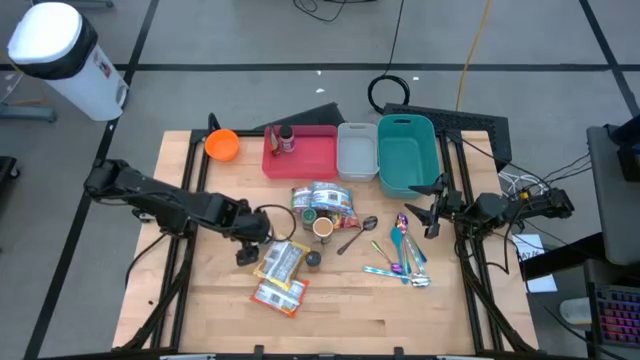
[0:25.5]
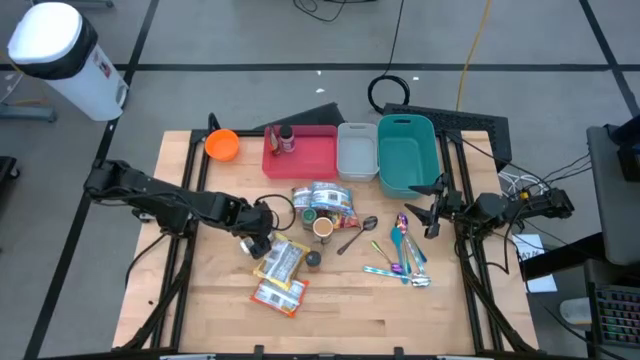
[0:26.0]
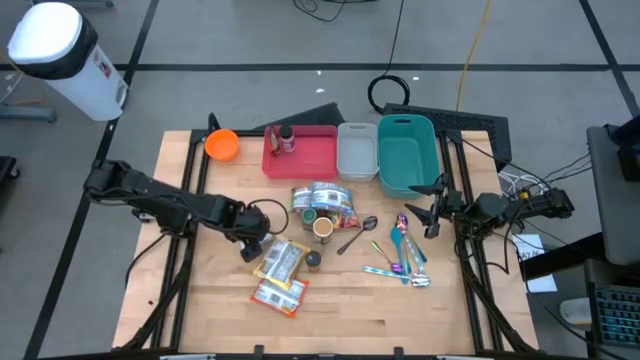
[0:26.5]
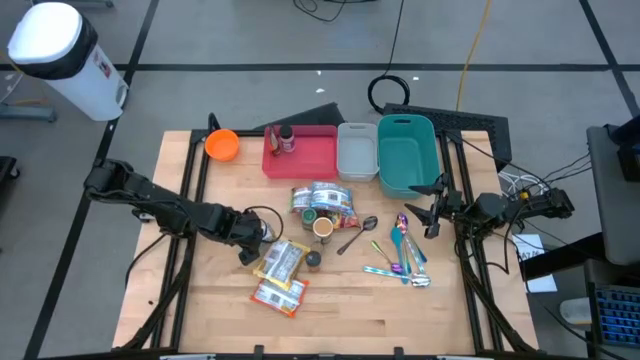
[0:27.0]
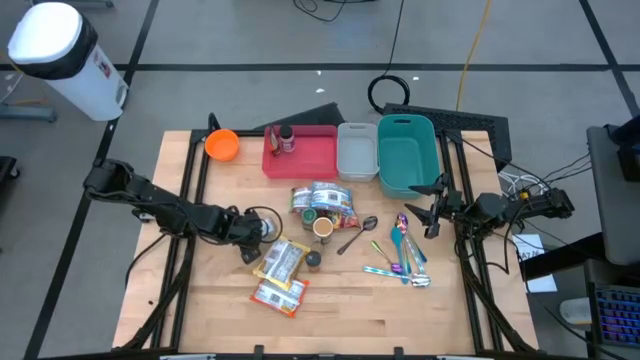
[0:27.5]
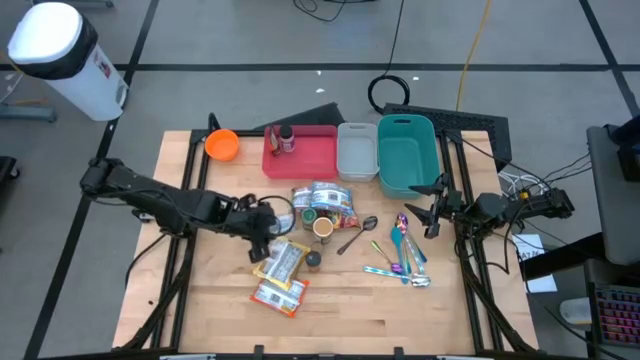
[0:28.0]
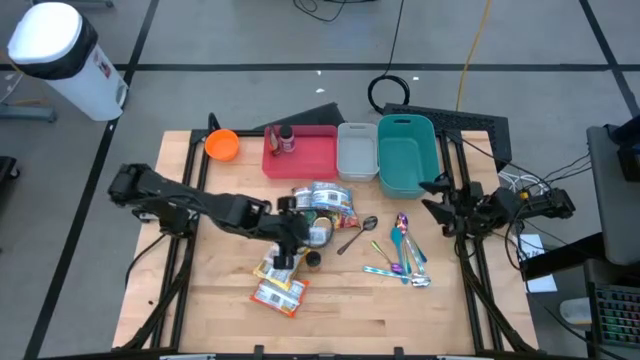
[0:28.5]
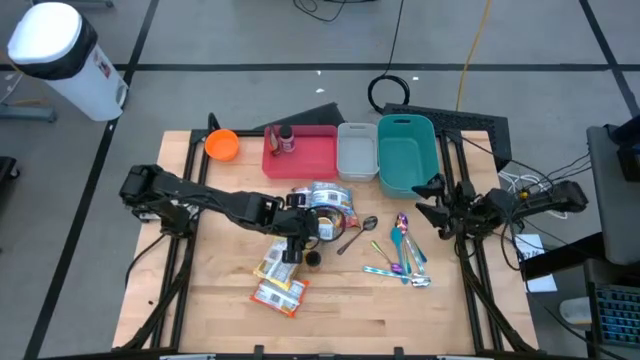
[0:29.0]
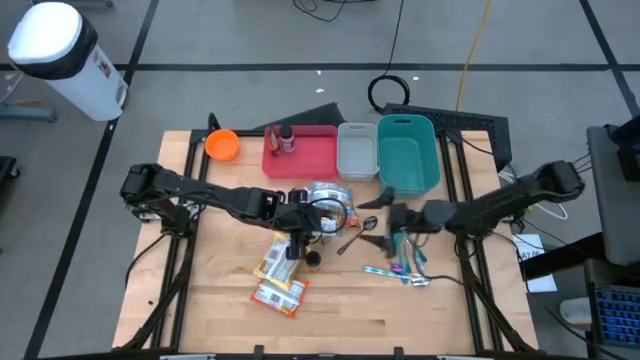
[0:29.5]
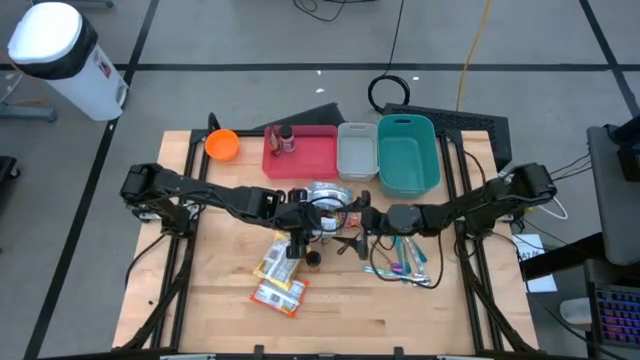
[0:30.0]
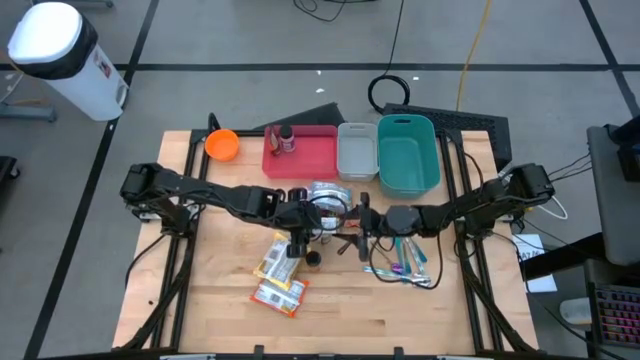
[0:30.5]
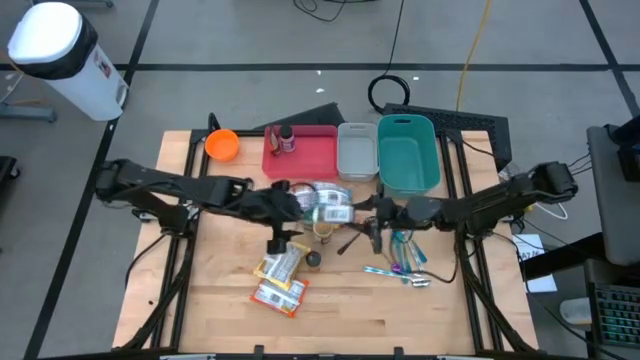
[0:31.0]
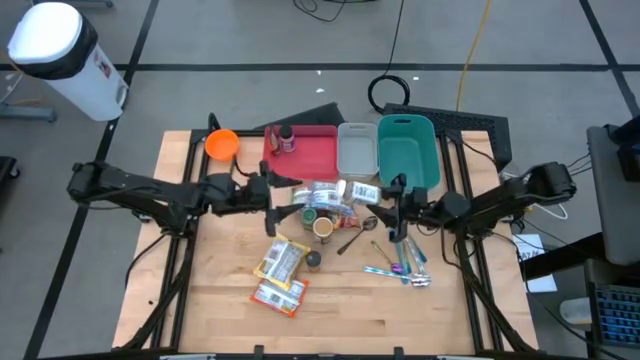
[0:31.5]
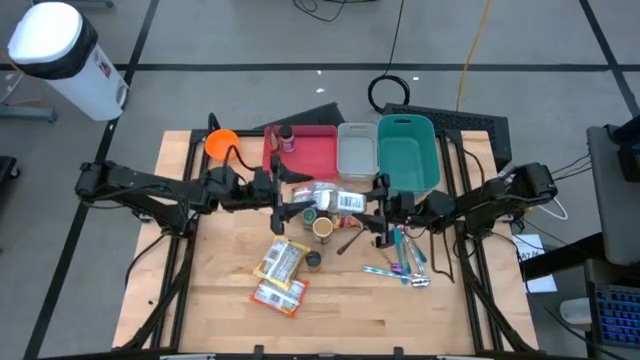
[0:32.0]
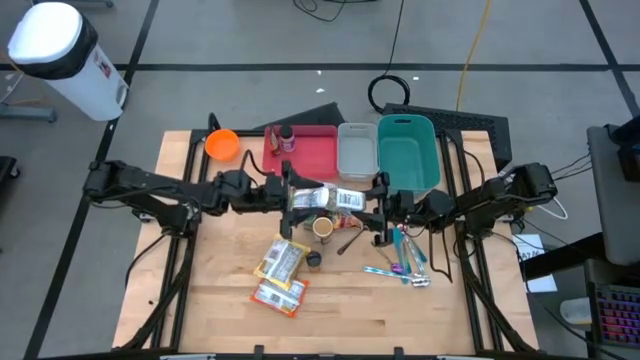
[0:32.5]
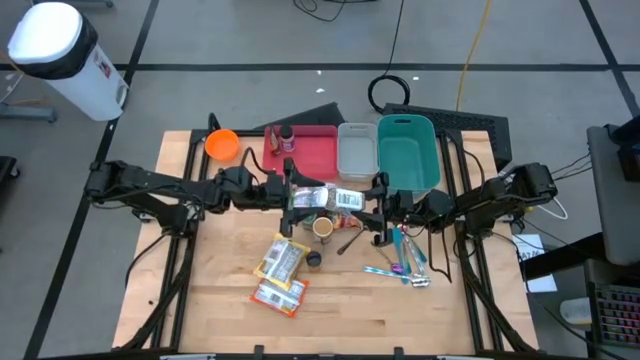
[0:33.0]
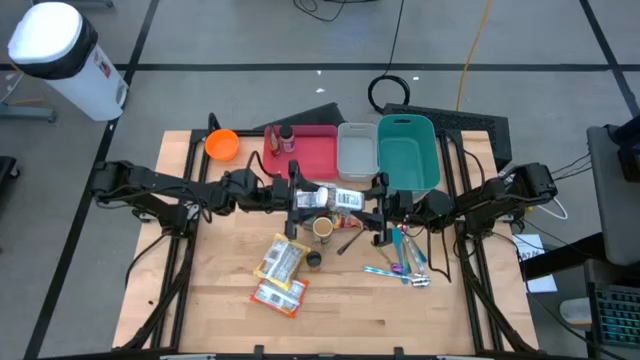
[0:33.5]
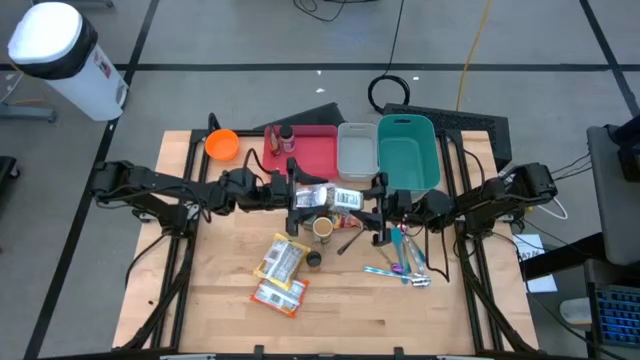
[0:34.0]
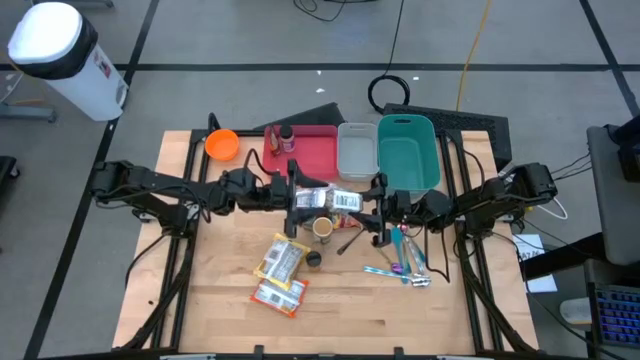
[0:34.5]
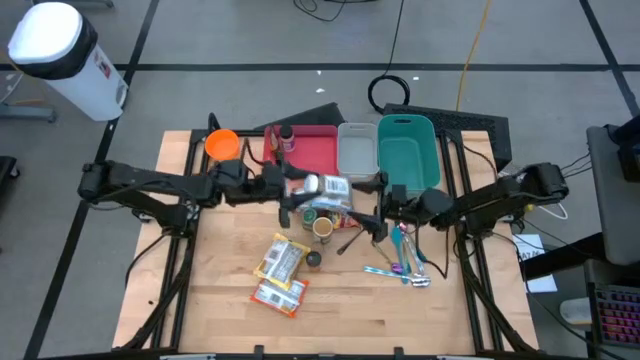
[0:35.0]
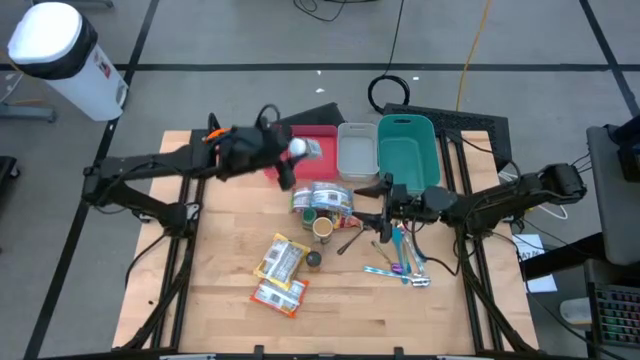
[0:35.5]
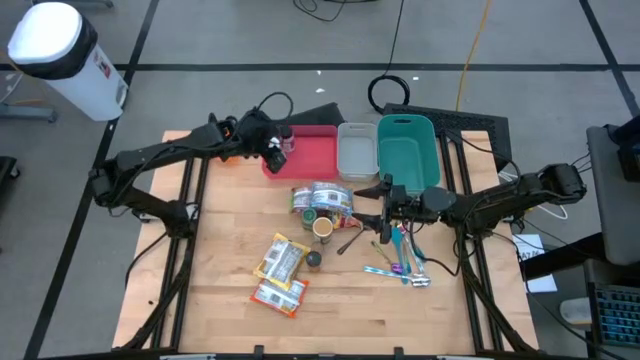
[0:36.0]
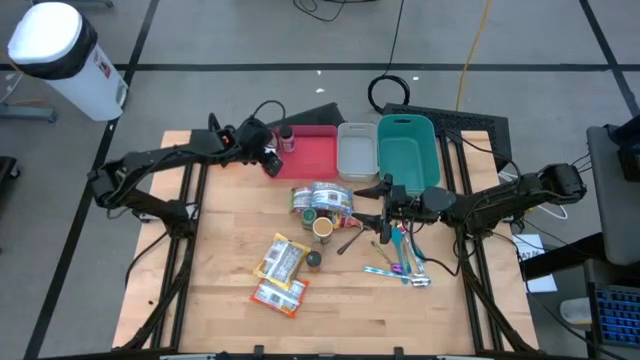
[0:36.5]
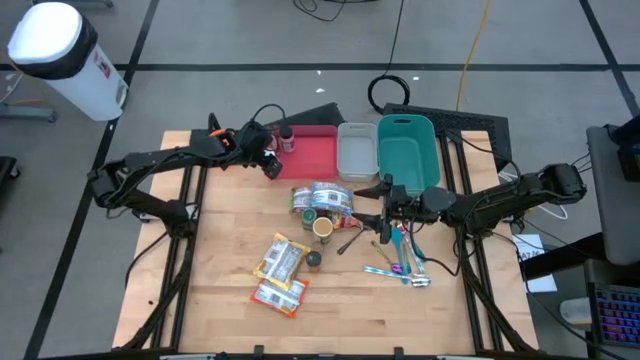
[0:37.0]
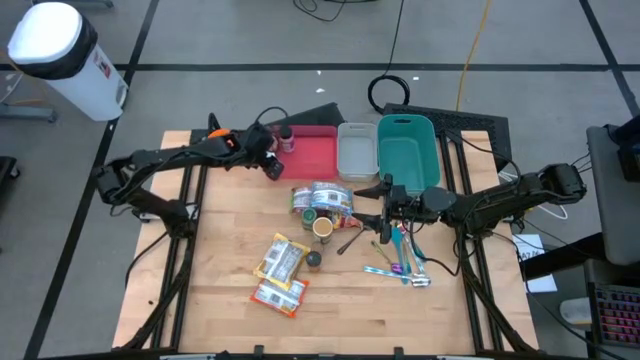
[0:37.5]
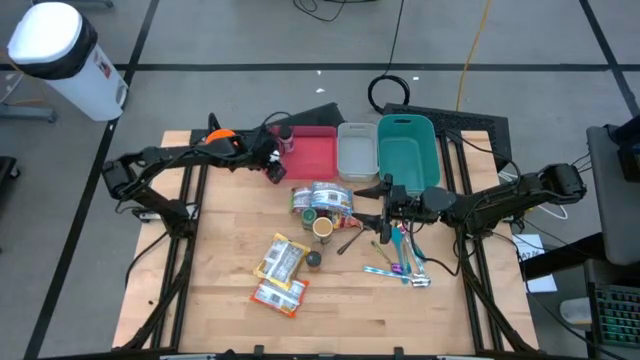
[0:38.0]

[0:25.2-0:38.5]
Task: Pick & Place Food Item
Put the white seasoning bottle into the red bin
